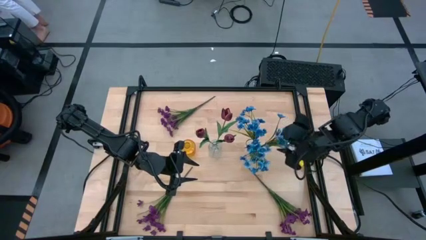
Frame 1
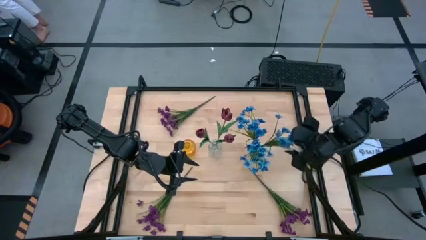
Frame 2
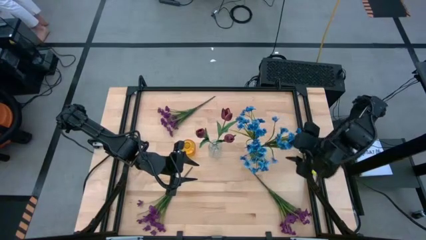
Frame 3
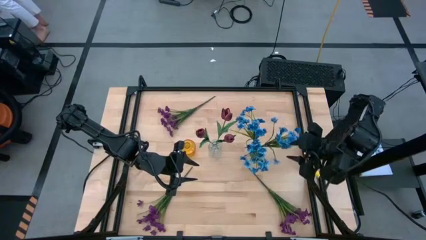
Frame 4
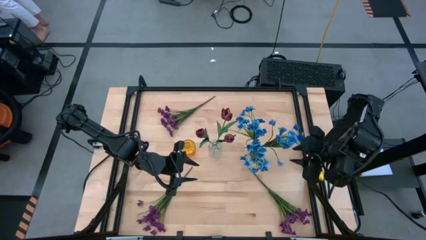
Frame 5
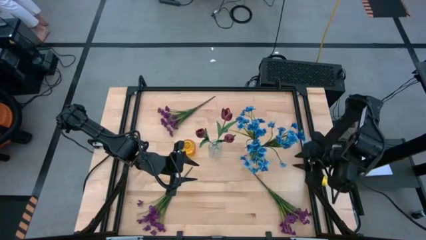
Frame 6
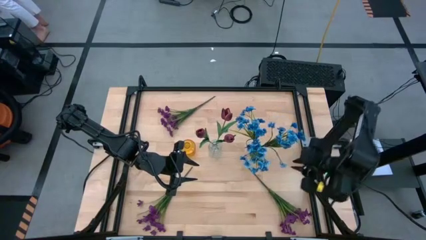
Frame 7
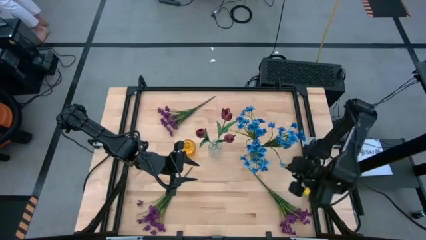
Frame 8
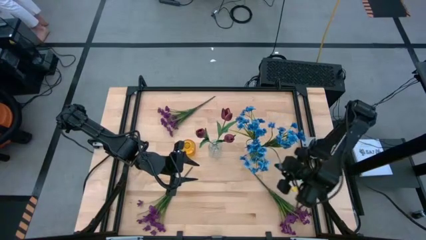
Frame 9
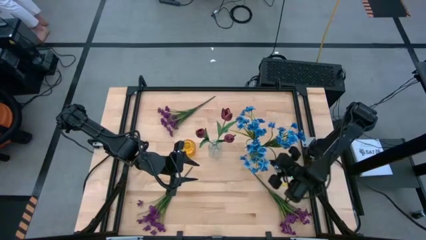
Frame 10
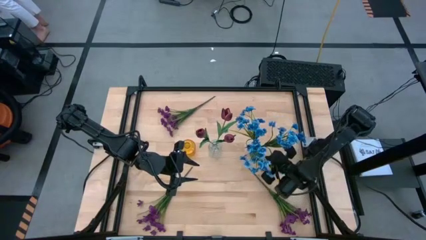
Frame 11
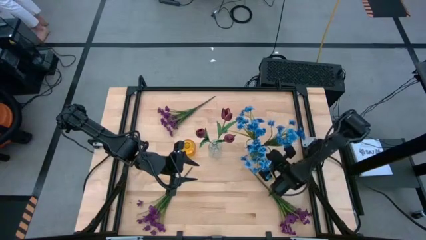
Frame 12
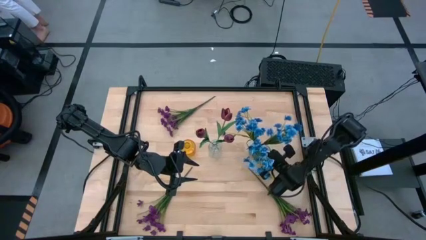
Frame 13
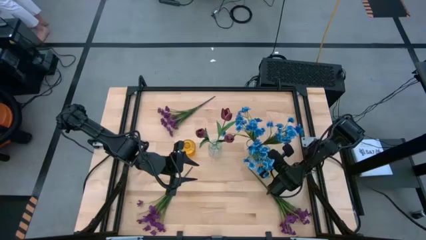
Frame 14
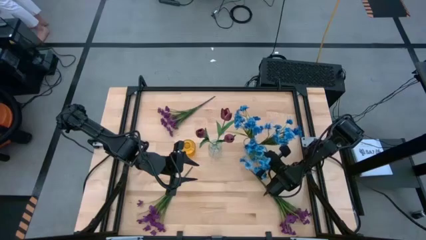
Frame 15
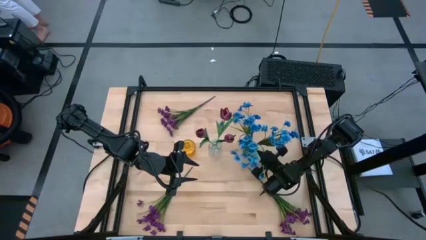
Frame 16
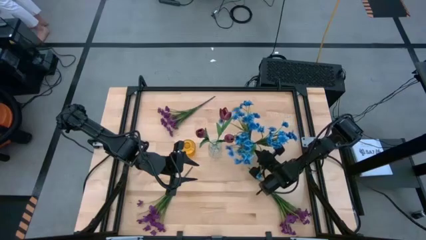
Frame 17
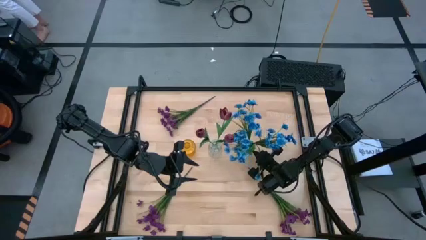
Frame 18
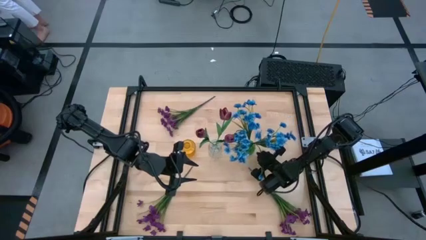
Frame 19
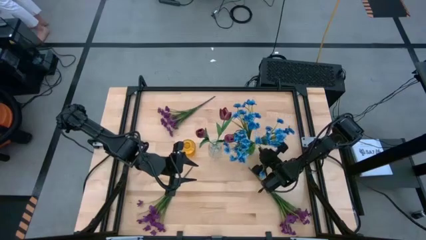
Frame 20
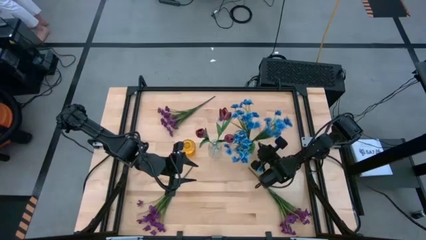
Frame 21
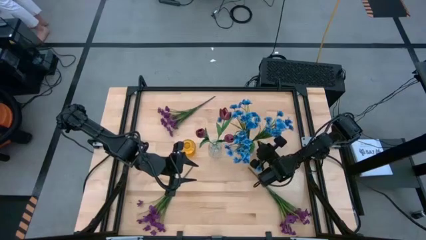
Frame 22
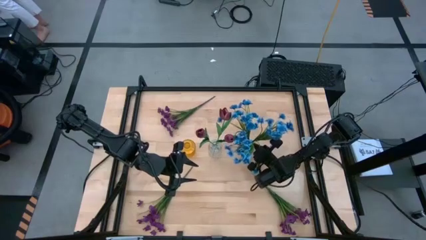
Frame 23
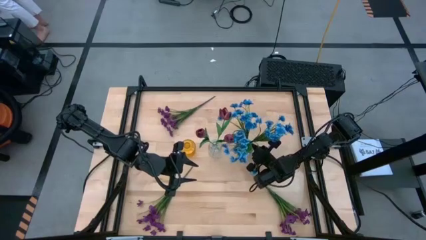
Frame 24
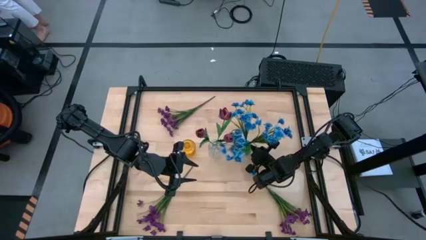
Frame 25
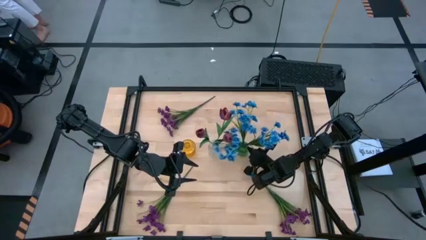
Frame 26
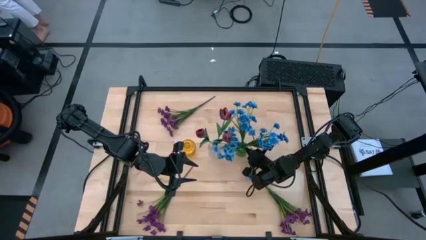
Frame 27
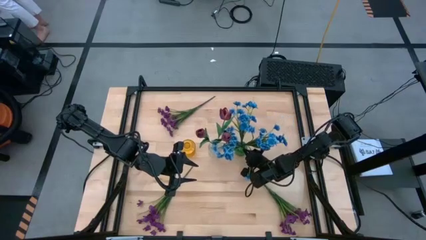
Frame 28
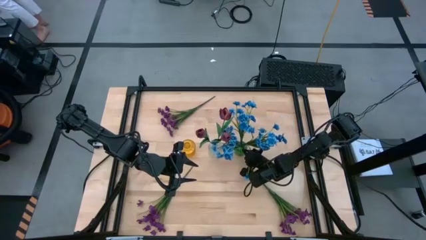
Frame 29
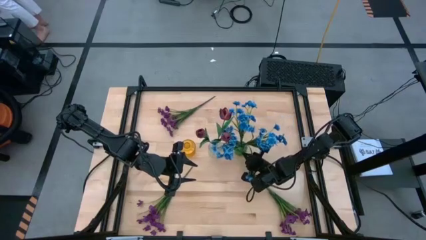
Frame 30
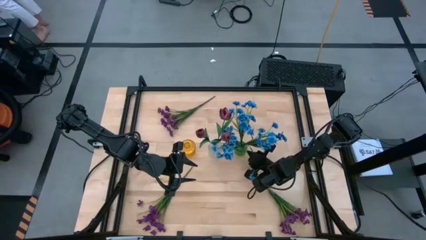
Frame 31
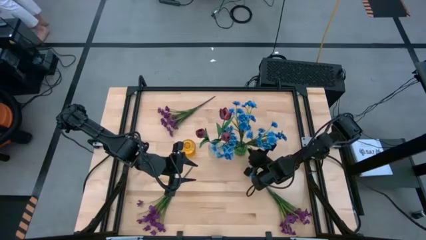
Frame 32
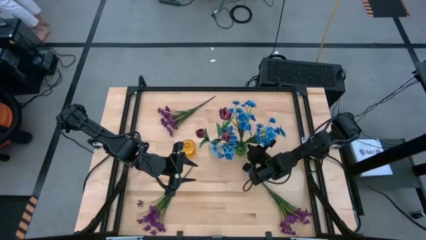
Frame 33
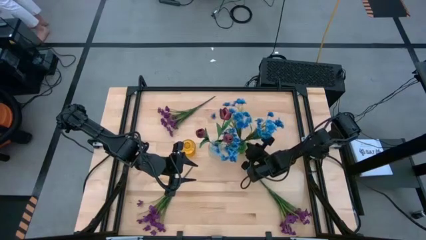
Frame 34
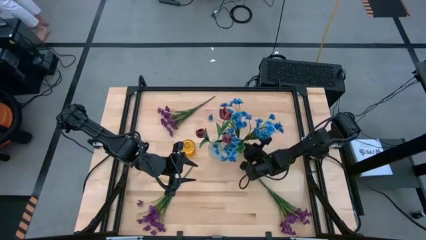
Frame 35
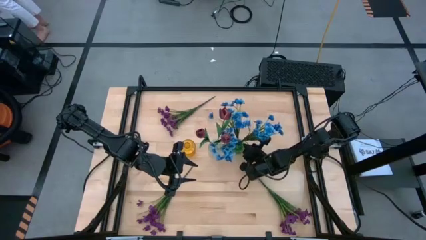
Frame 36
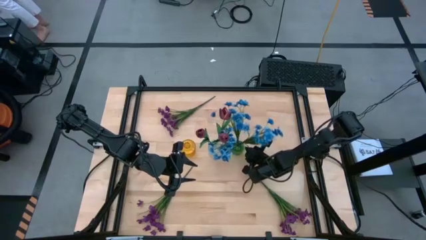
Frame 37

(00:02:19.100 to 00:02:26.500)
Task: Sort flowers into vase by color
Adjust the green vase

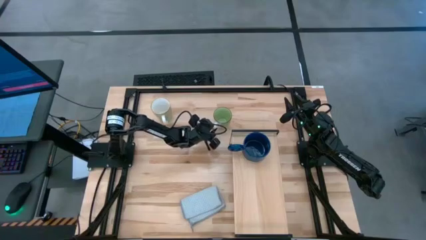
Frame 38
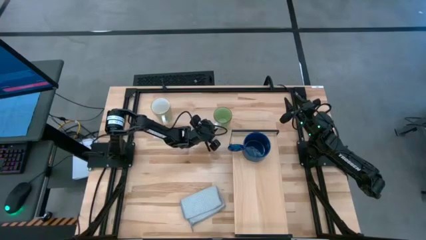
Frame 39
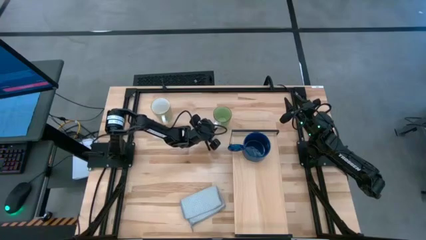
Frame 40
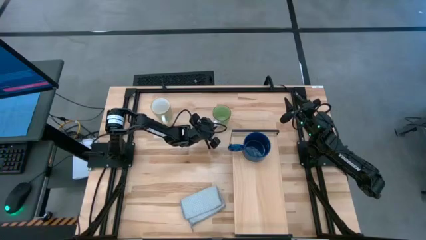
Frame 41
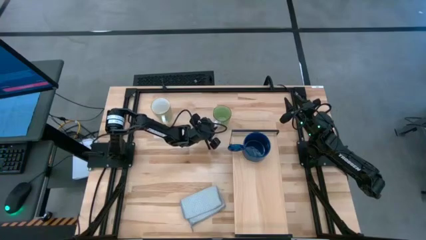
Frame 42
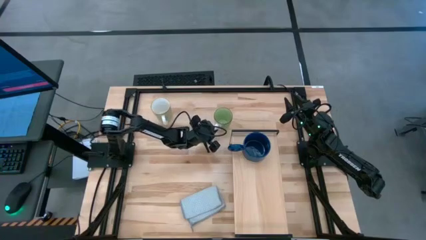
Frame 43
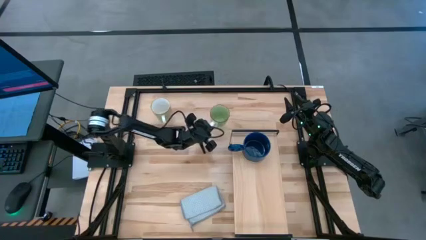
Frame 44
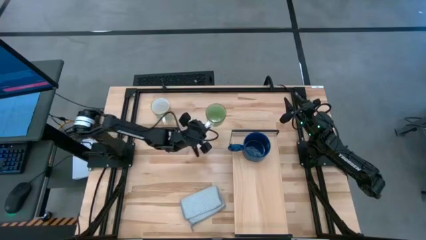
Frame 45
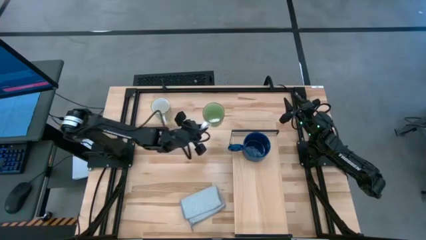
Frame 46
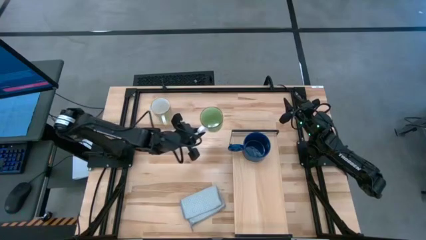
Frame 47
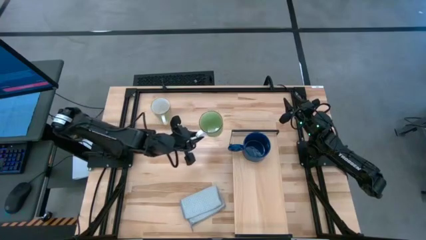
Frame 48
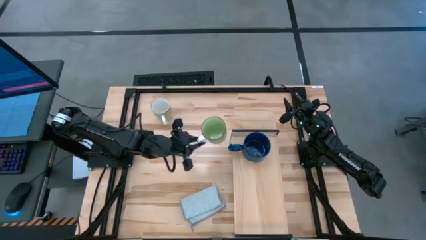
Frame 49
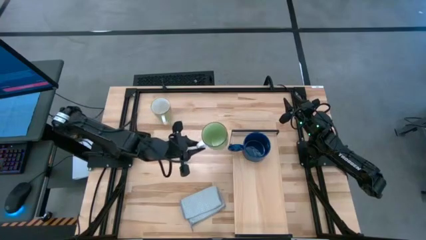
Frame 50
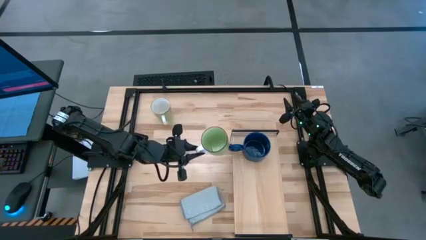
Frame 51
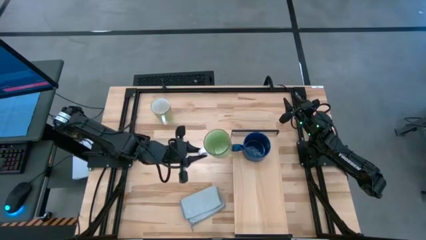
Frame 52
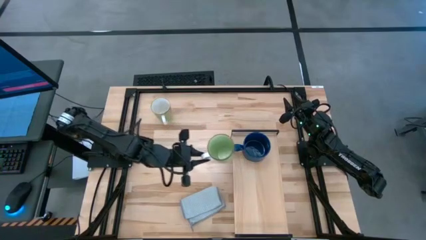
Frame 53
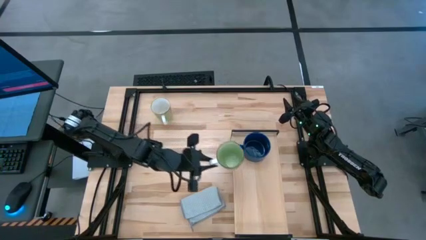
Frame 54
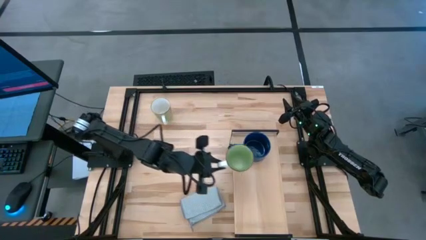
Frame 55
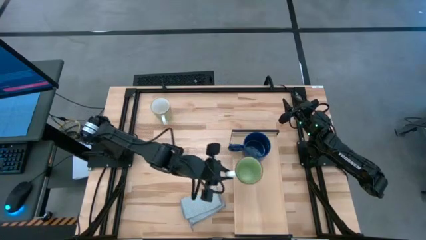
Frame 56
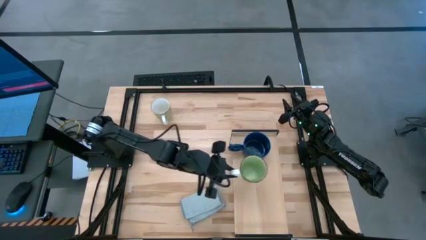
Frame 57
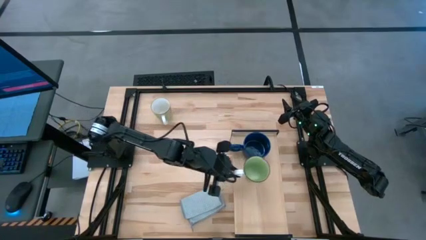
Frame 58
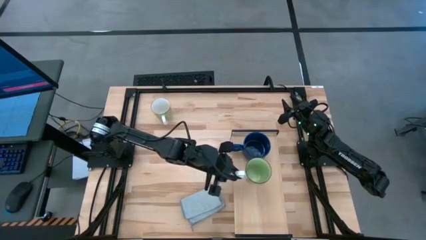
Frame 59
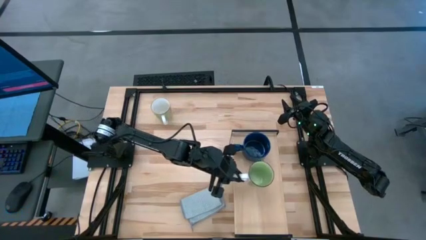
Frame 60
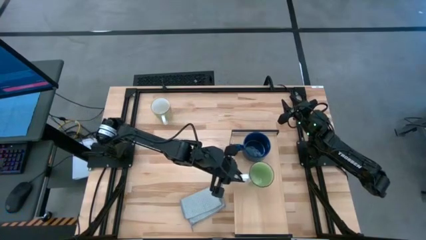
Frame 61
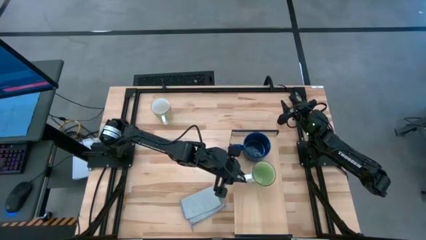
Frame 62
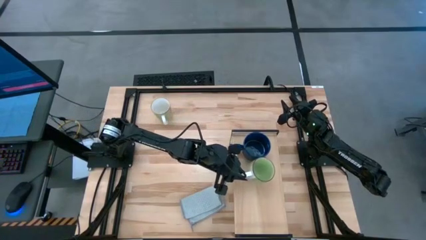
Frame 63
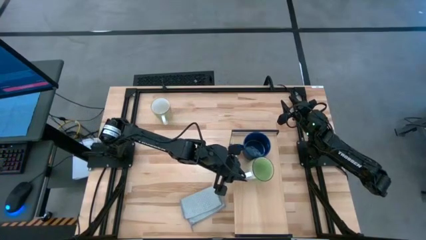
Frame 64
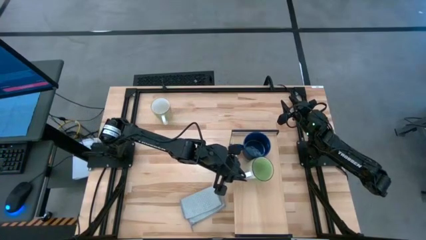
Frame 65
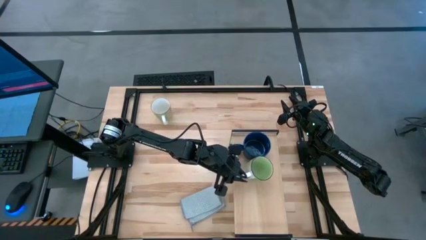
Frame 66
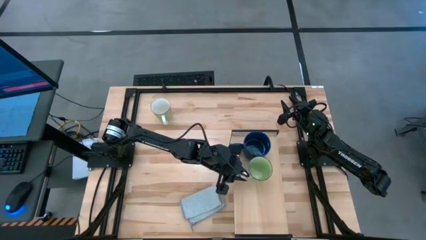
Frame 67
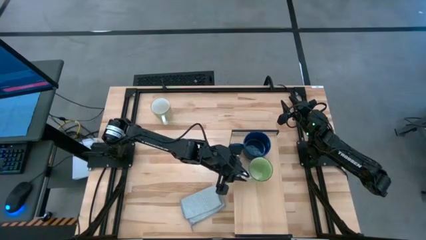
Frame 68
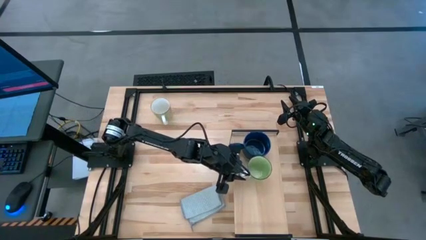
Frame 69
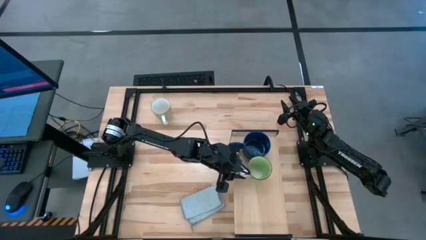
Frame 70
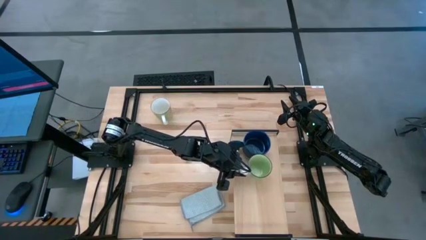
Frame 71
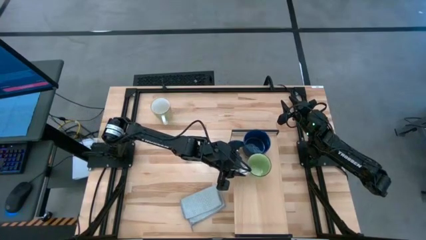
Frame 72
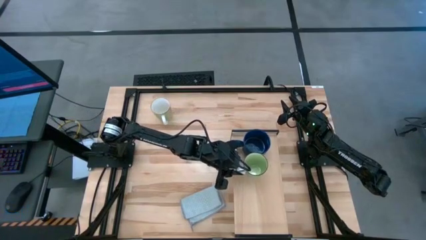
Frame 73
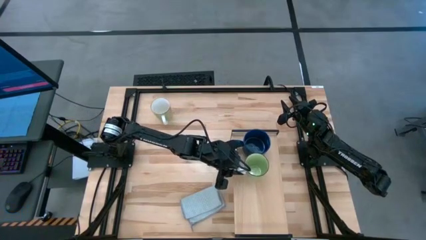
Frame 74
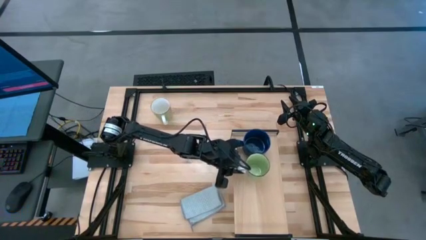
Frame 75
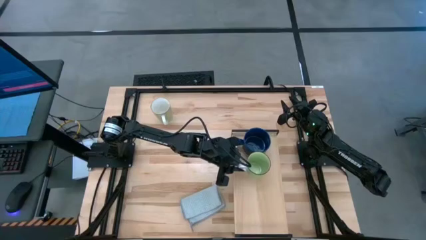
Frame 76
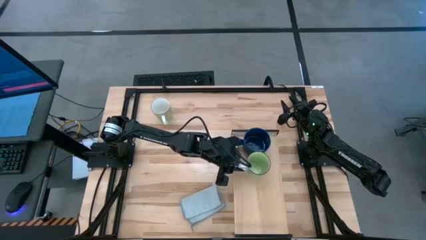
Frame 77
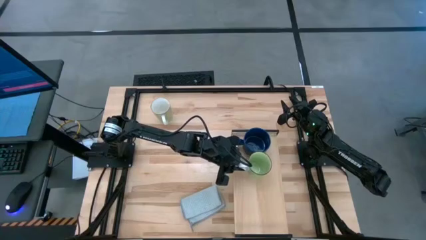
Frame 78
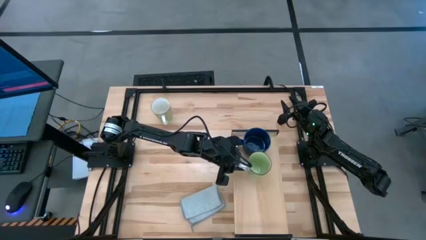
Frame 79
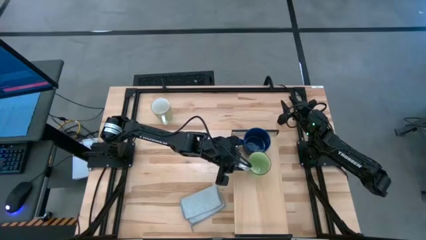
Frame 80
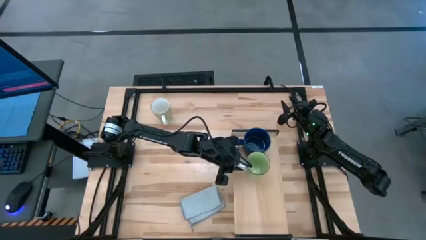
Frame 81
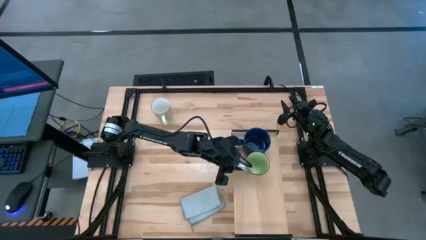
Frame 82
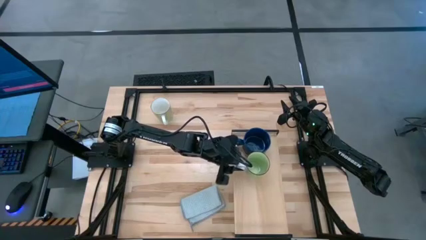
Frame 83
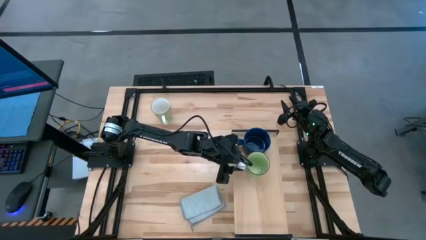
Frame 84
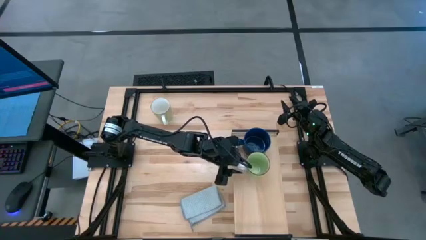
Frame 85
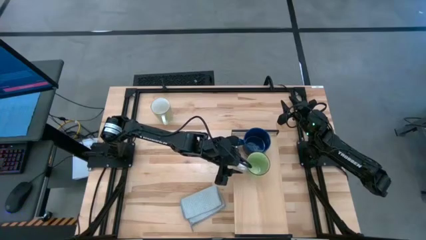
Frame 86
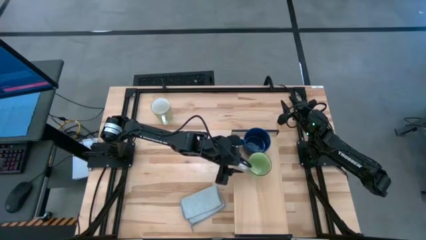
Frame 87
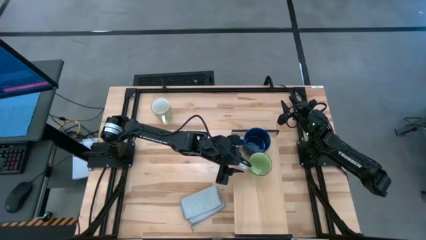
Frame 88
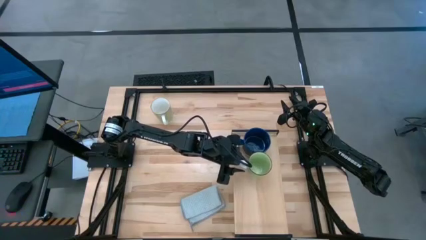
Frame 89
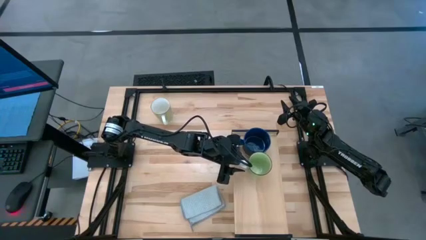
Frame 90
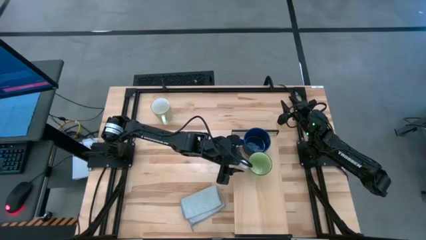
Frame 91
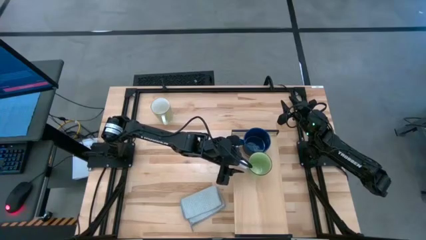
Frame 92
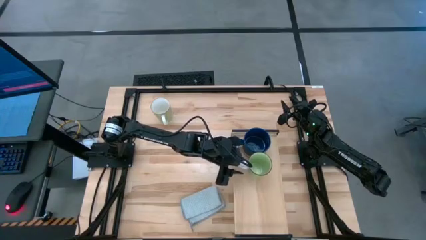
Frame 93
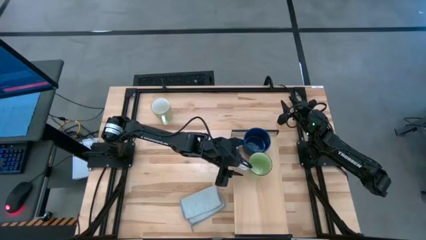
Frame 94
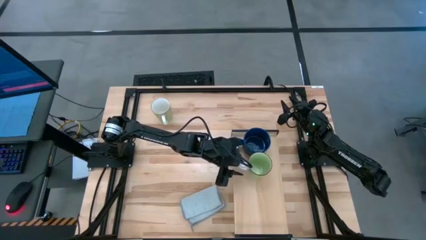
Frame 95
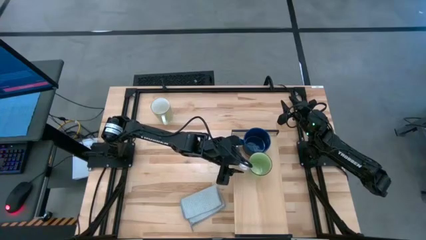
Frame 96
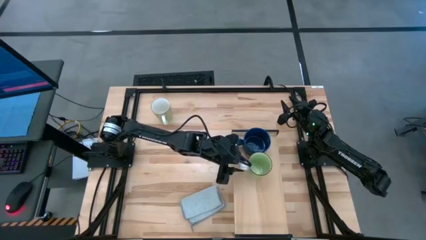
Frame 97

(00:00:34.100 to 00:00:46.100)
Task: Stack small to large cups/mugs on shelf
Put the light green cup on the shelf
